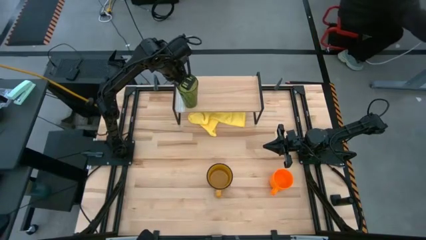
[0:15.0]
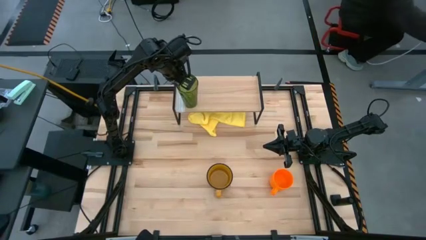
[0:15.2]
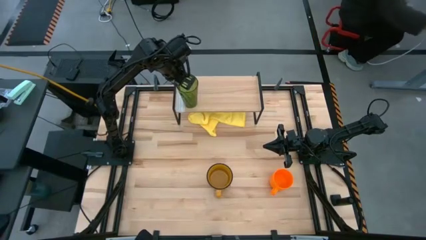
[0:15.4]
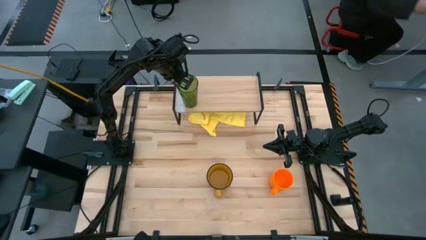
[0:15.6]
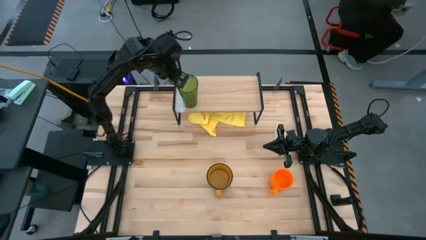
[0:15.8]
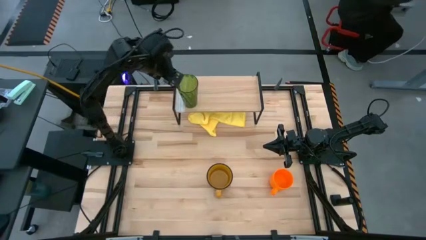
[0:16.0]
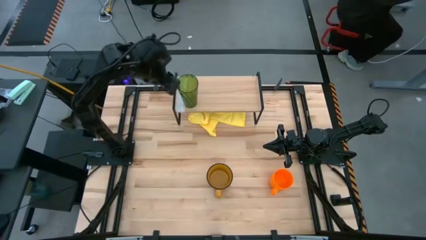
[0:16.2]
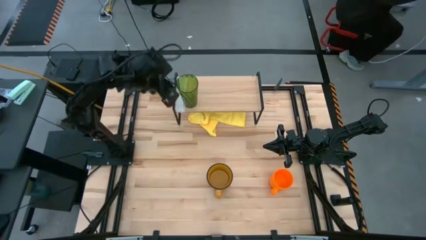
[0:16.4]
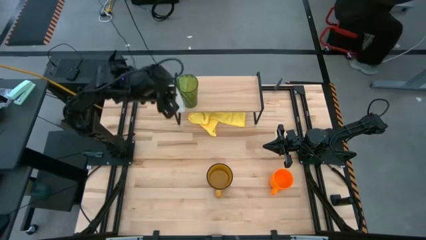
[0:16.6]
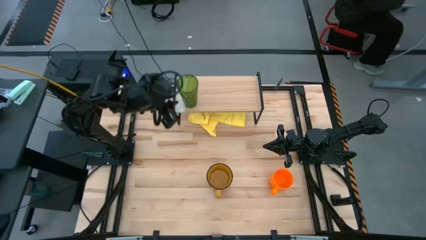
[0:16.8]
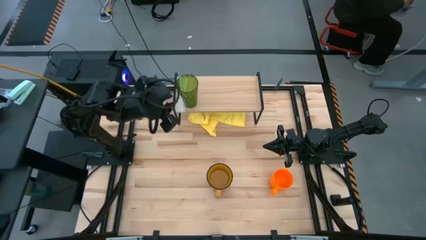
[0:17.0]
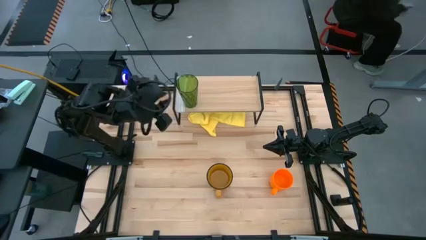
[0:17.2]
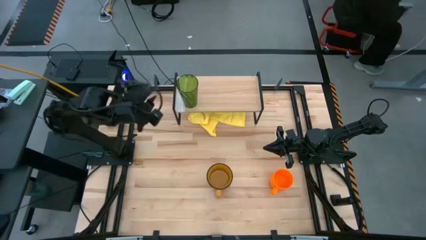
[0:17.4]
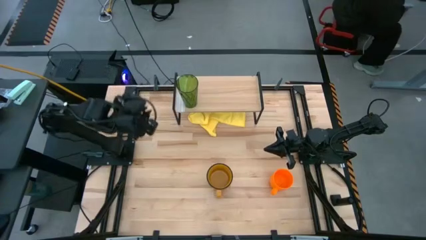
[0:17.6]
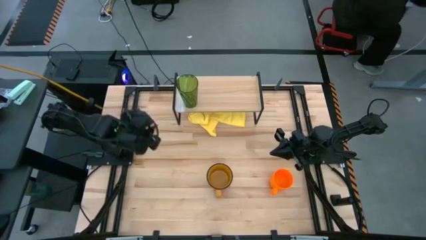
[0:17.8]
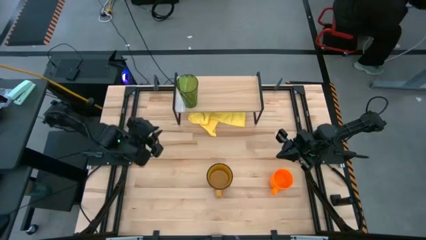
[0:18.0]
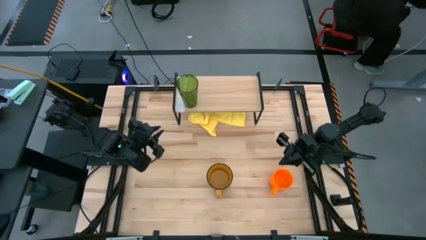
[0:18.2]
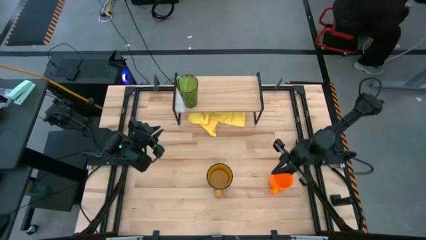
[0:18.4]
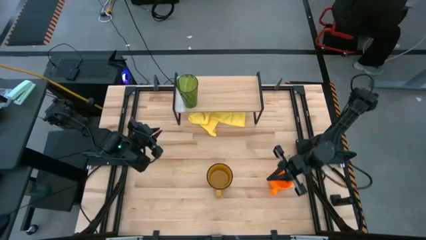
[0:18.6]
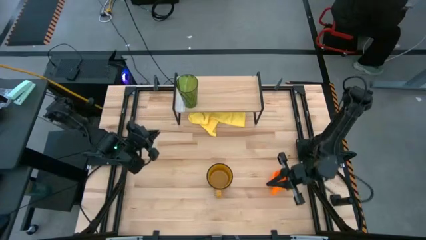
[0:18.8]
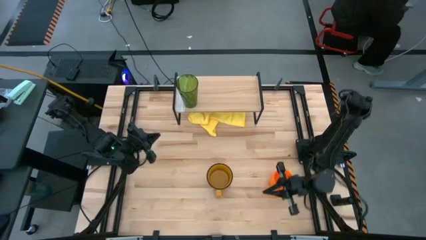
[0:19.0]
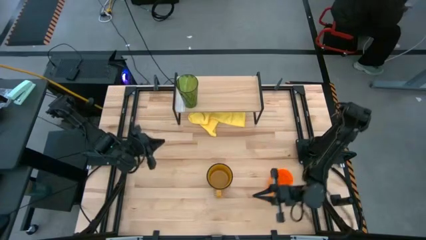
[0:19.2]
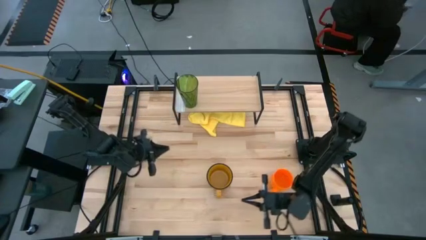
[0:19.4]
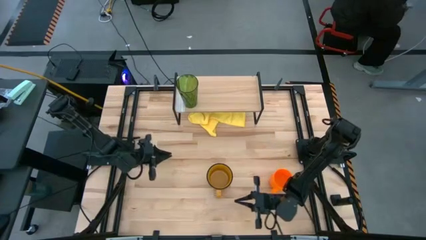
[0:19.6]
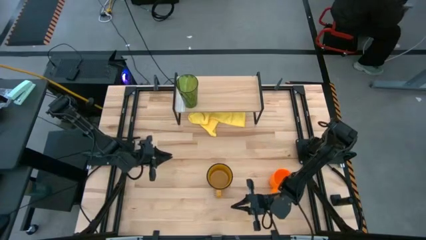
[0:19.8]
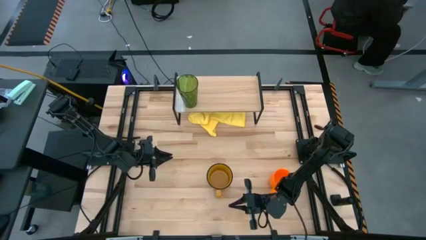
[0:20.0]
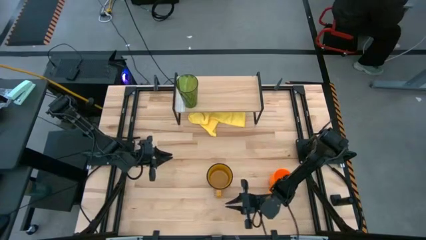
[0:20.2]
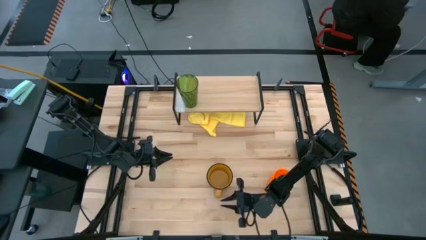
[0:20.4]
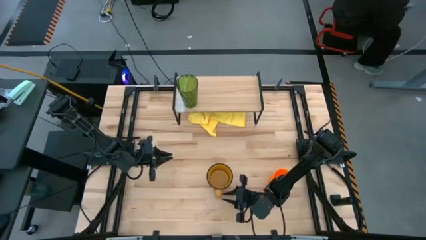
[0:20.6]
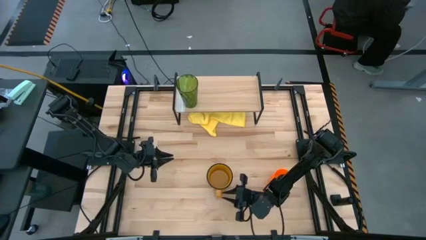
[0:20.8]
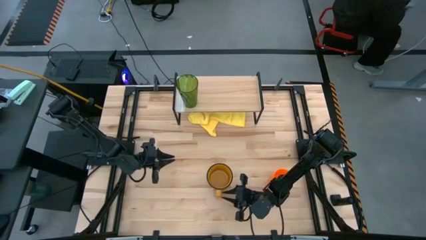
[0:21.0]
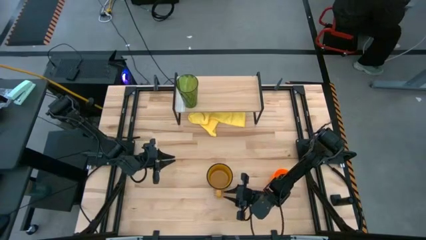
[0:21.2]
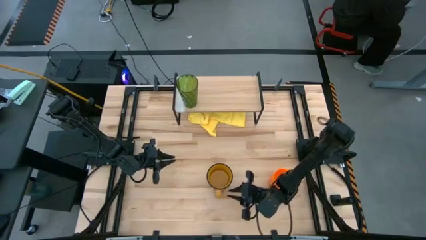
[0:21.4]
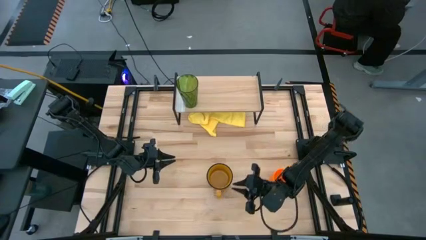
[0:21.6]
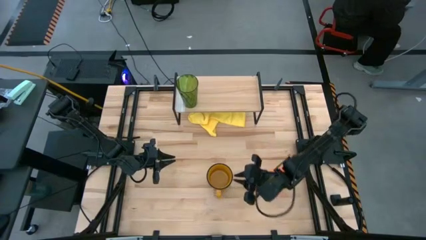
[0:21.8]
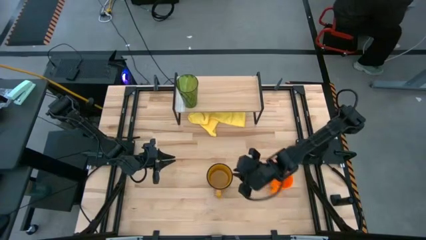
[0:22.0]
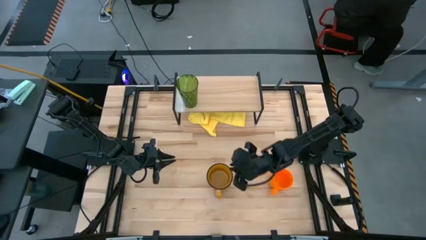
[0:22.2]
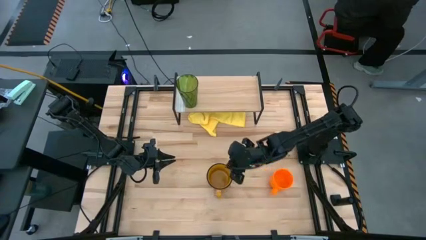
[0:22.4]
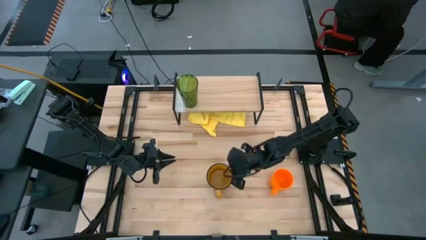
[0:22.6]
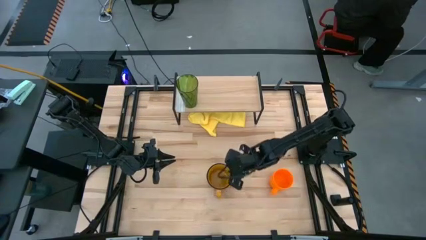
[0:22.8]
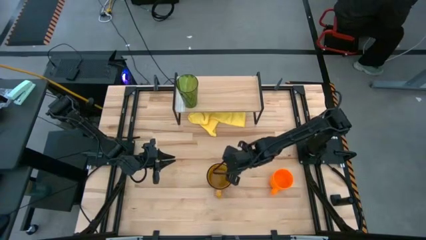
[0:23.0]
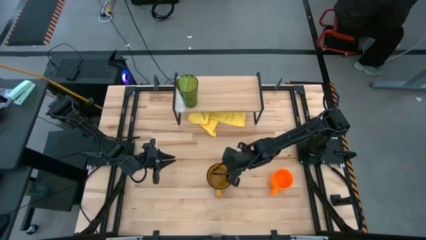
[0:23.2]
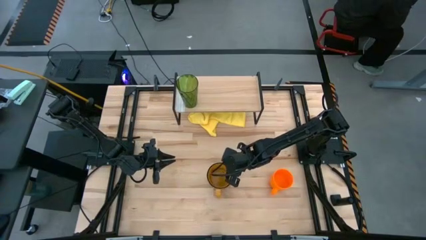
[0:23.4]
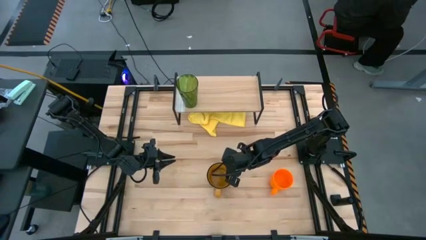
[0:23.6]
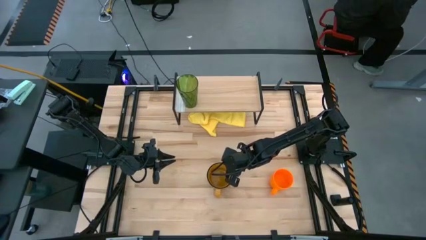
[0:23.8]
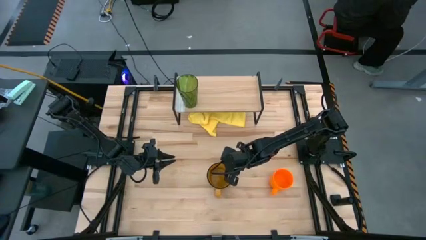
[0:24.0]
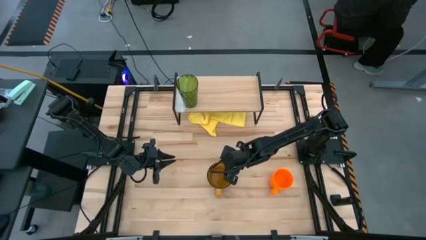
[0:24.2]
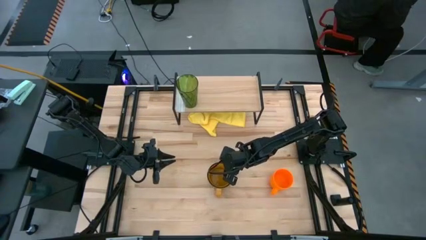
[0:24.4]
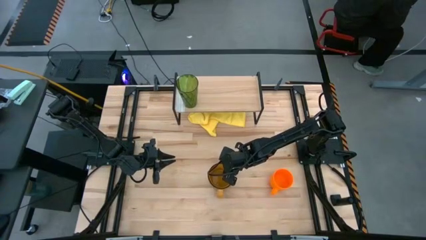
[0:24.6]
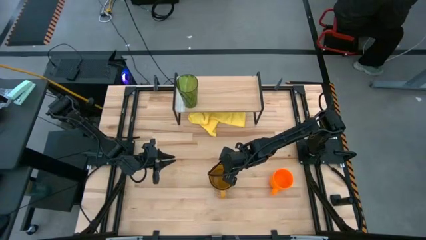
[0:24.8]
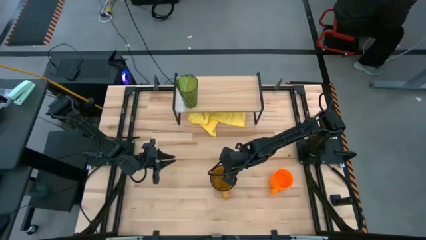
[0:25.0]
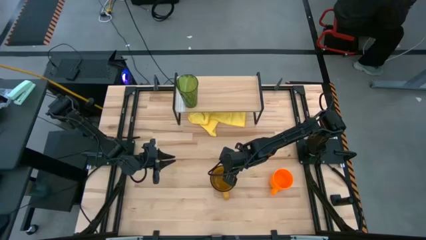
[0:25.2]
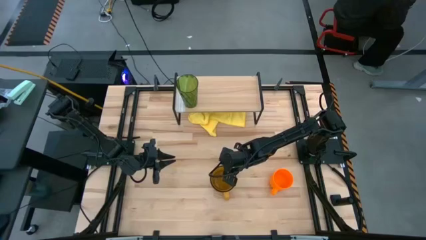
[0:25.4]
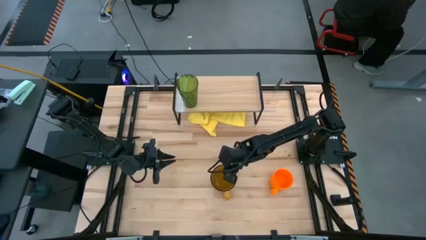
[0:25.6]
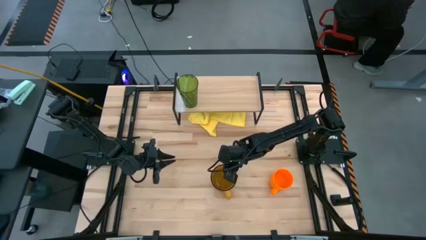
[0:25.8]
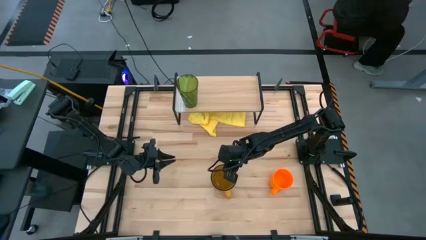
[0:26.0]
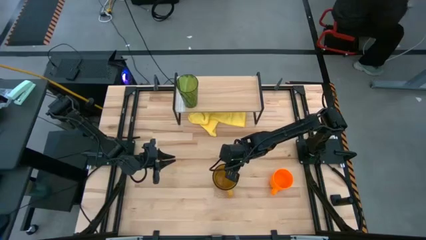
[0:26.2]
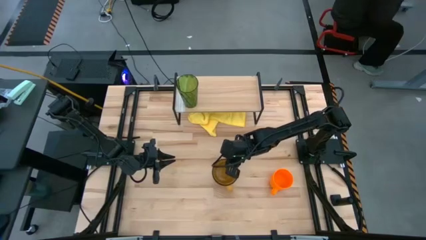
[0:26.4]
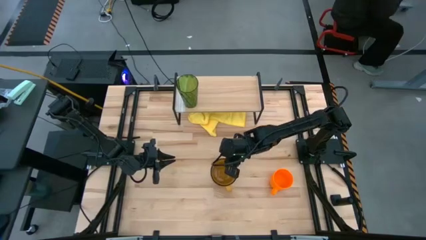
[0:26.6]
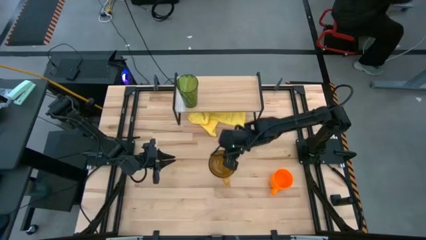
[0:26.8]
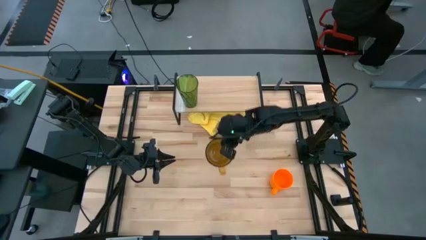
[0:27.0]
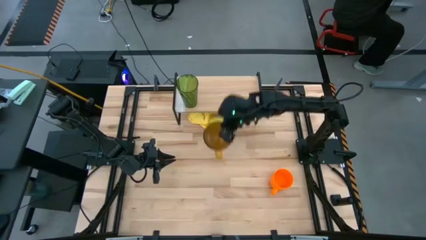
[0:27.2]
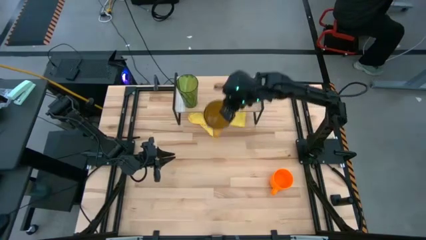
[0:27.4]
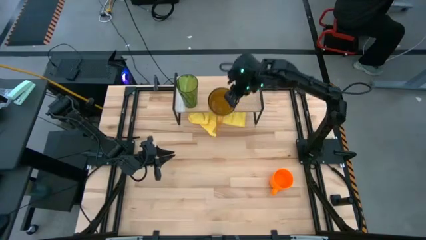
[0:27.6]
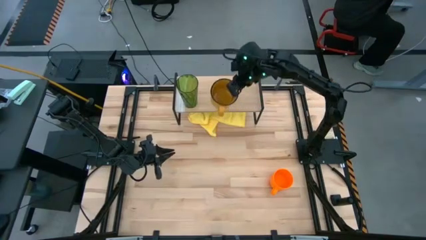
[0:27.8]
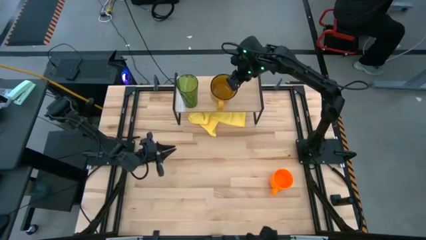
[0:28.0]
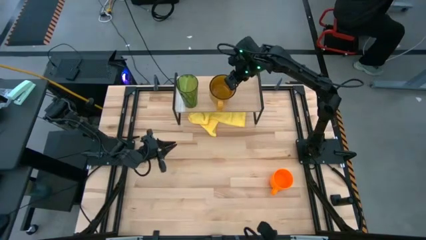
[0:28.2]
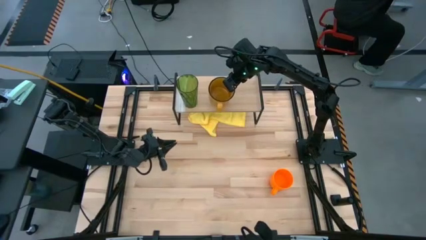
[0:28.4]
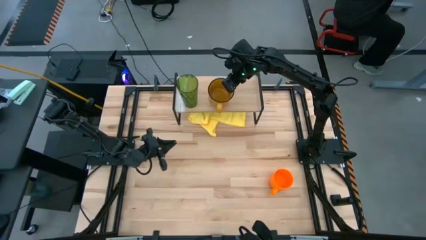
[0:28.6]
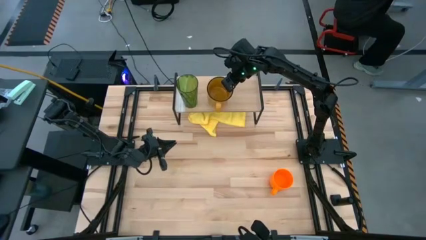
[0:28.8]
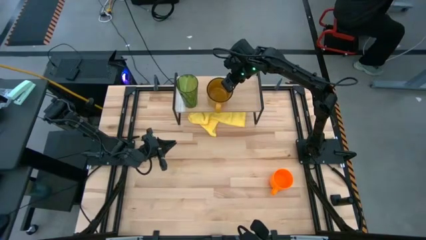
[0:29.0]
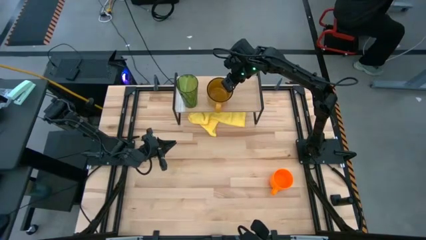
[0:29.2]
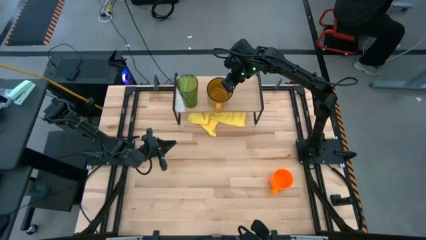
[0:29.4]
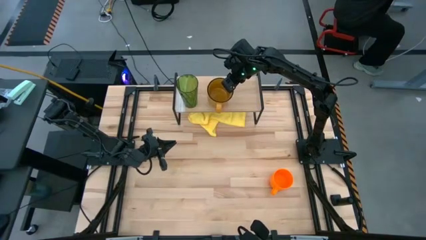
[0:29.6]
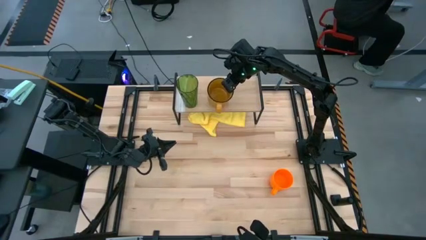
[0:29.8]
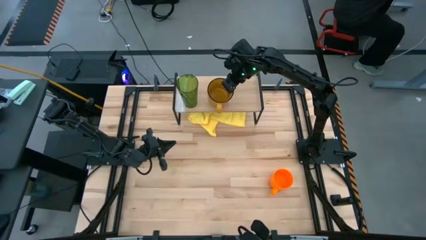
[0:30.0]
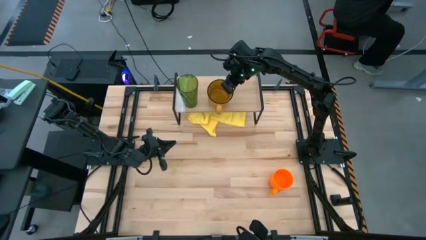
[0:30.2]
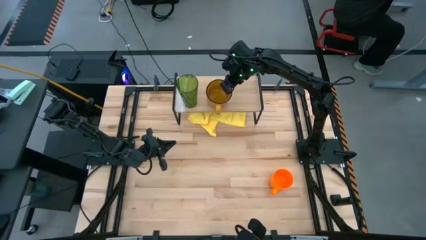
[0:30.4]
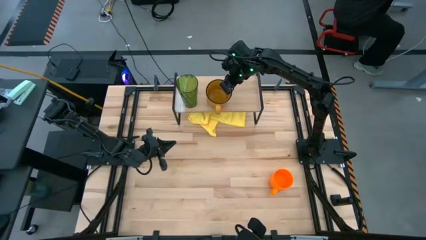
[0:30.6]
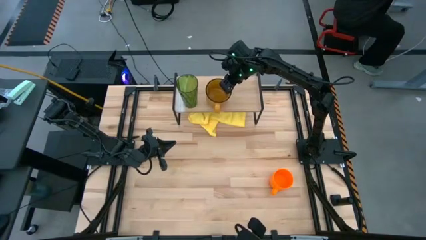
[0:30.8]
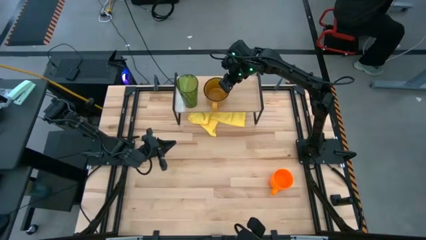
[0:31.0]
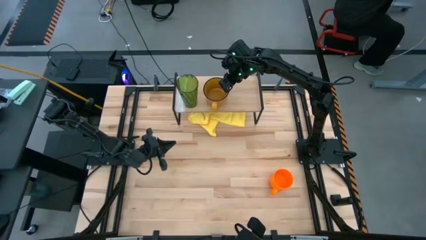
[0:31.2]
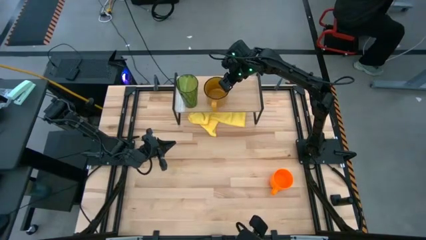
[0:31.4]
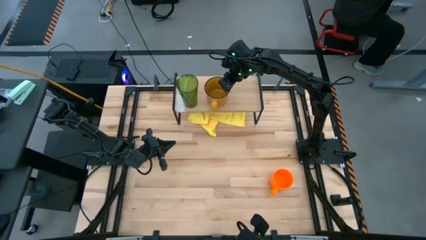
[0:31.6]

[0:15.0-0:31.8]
Task: Stack small to large cups/mugs on shelf
Put the yellow mug on the shelf
